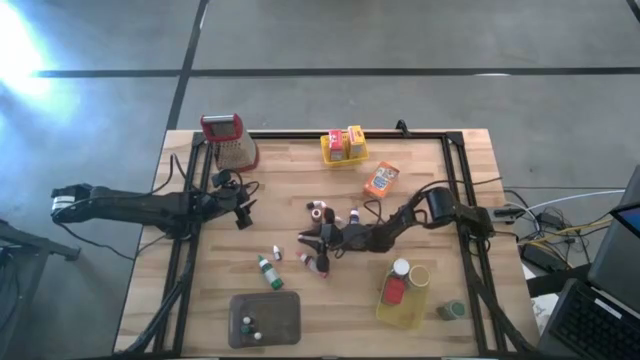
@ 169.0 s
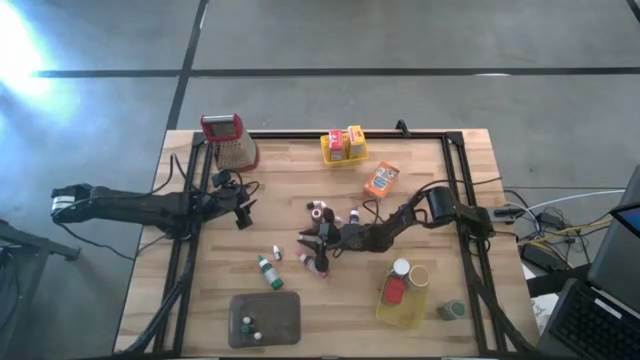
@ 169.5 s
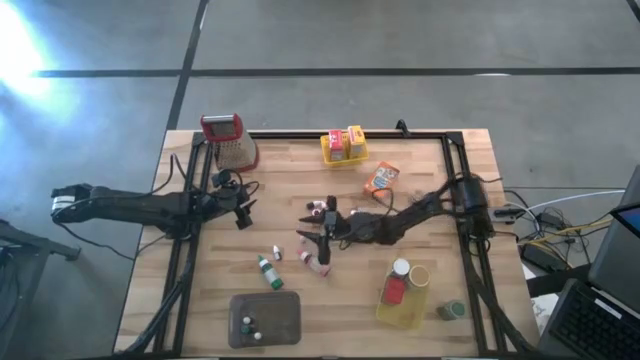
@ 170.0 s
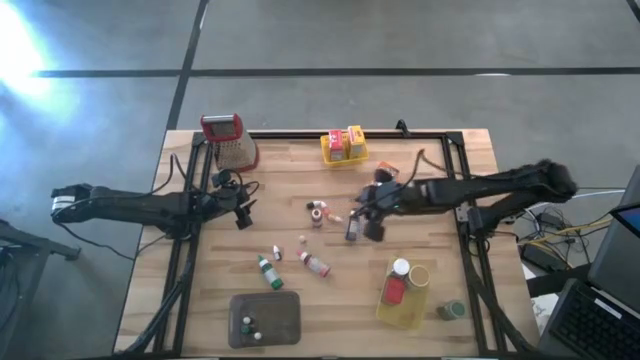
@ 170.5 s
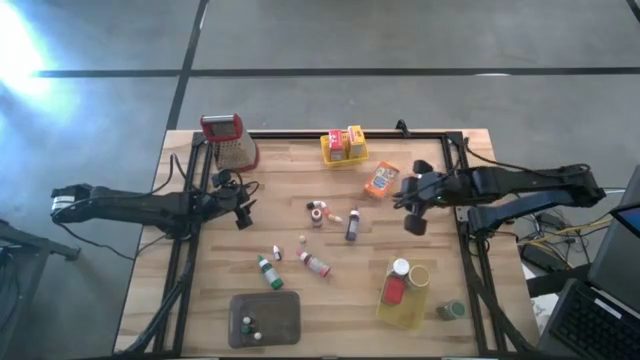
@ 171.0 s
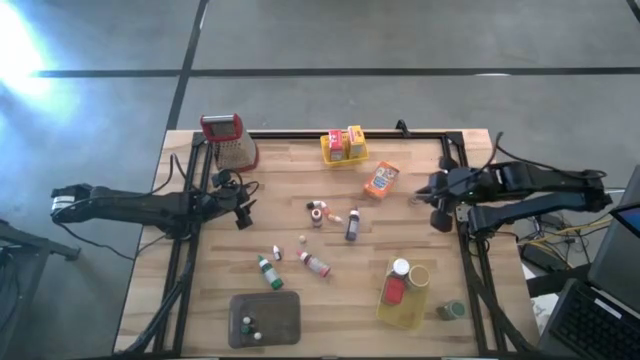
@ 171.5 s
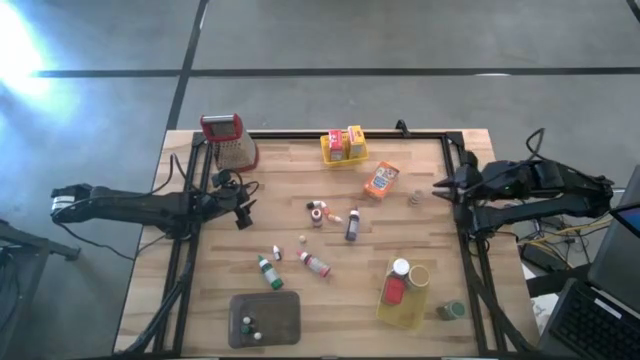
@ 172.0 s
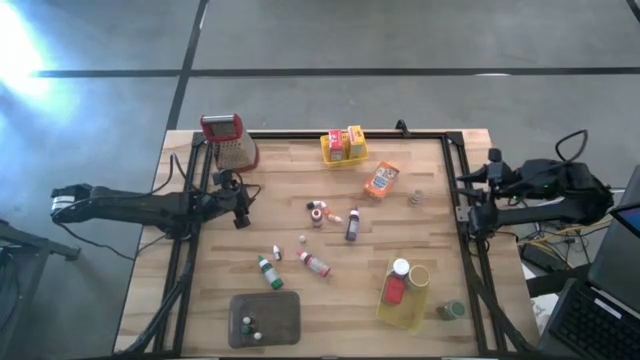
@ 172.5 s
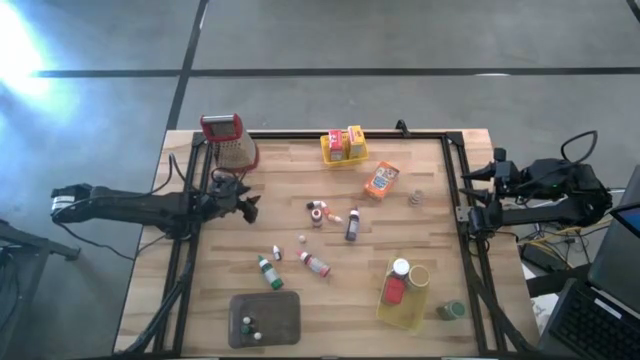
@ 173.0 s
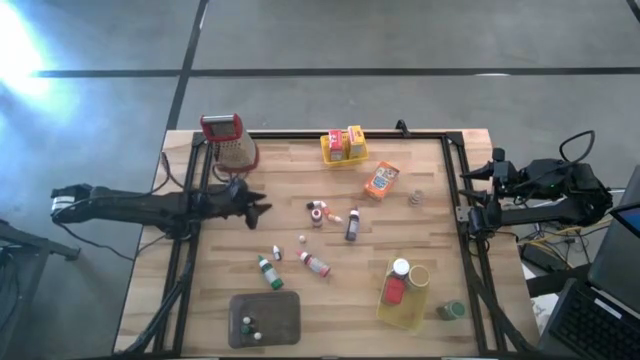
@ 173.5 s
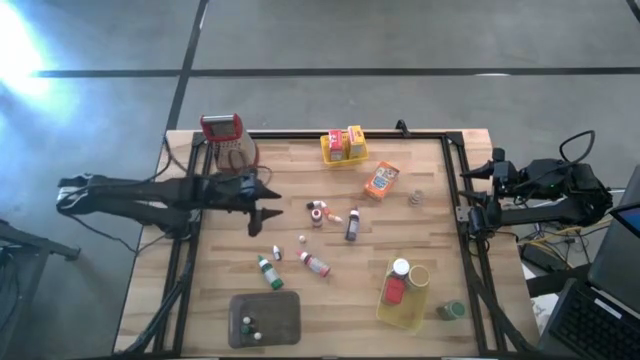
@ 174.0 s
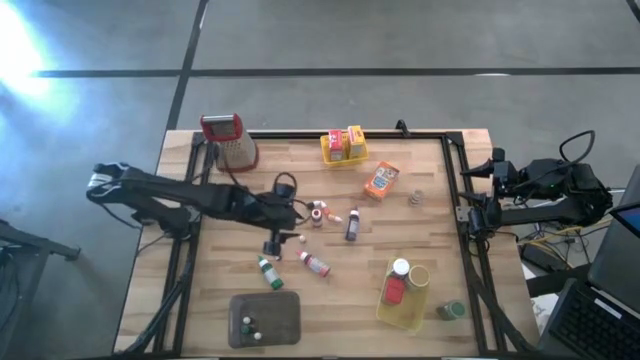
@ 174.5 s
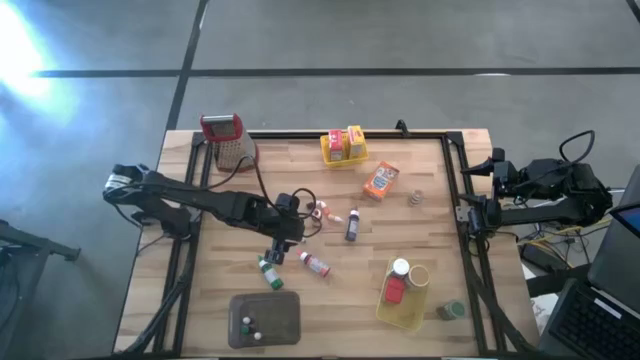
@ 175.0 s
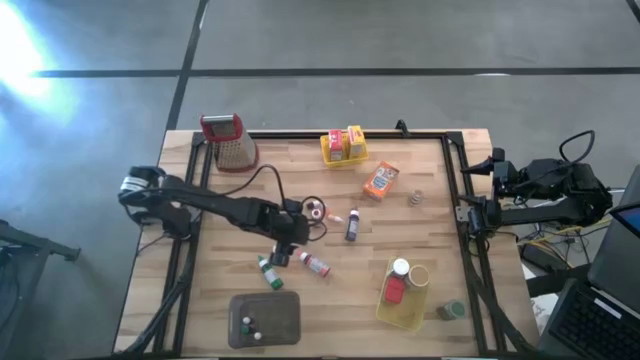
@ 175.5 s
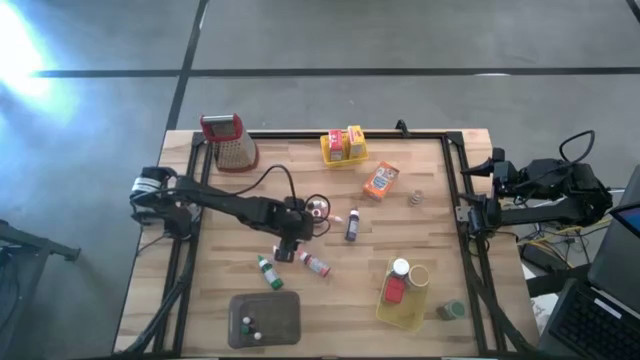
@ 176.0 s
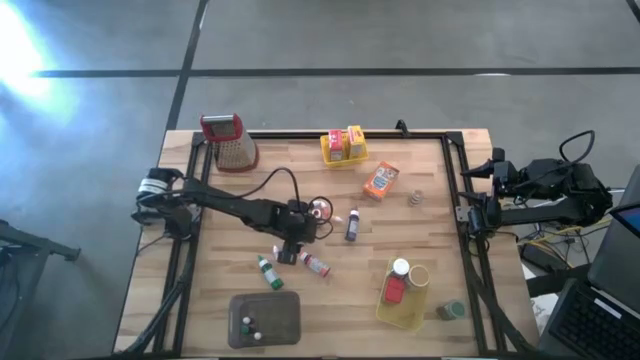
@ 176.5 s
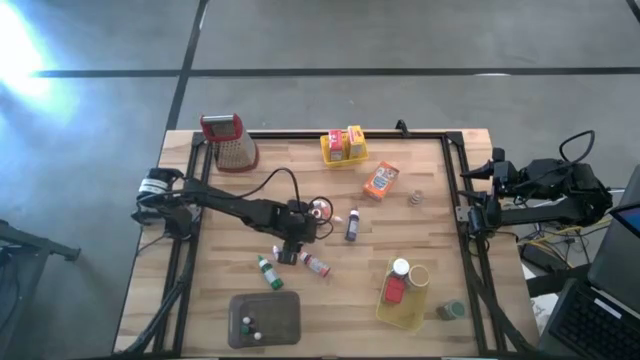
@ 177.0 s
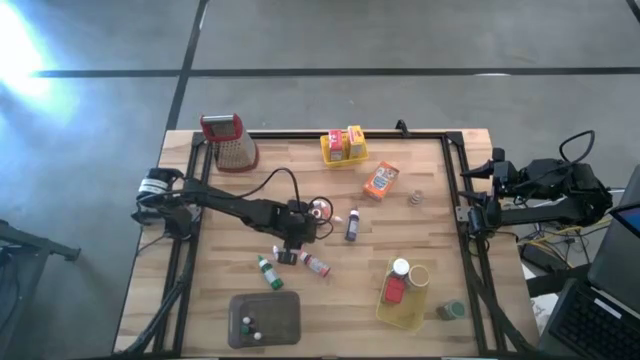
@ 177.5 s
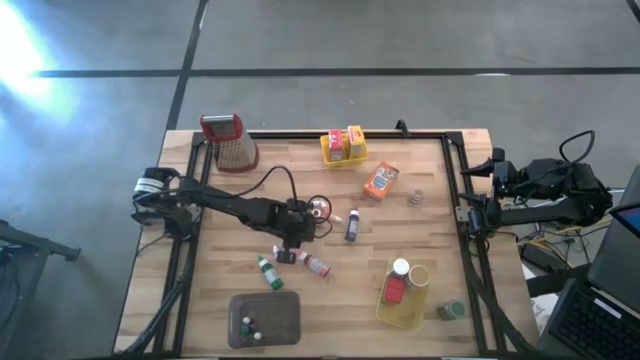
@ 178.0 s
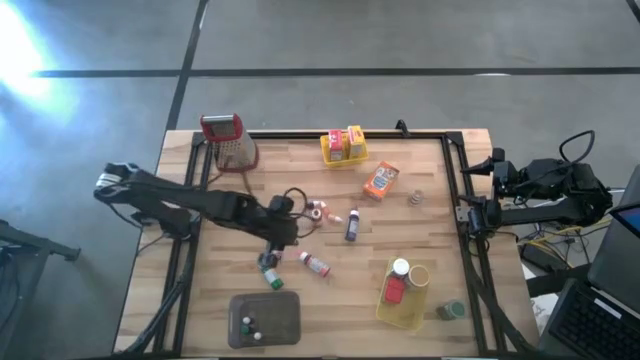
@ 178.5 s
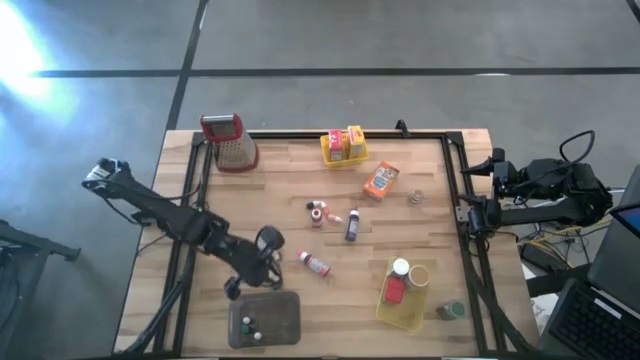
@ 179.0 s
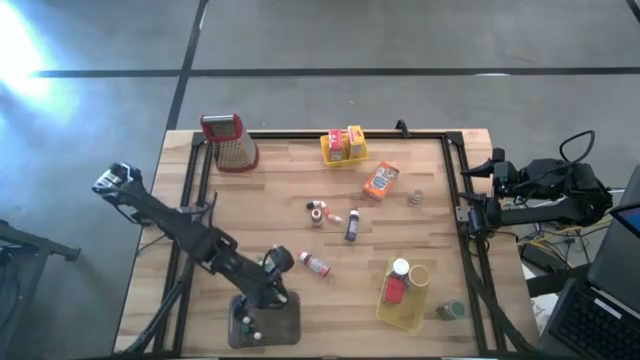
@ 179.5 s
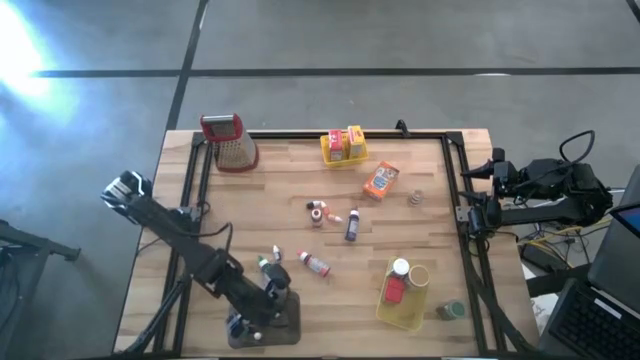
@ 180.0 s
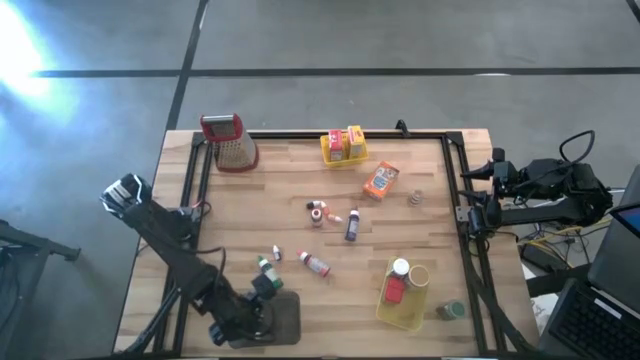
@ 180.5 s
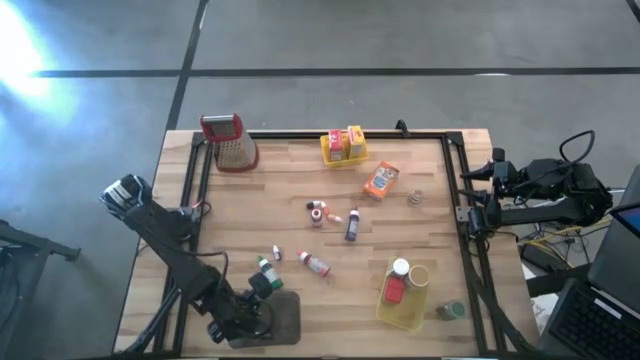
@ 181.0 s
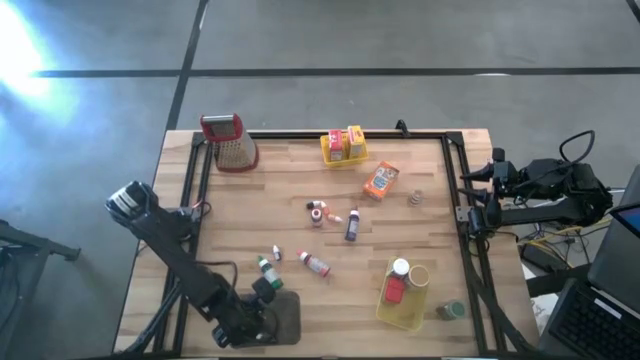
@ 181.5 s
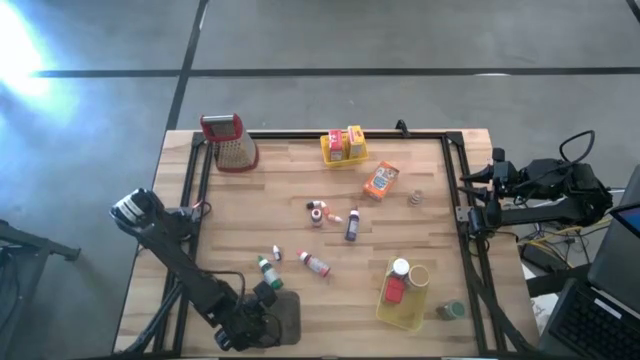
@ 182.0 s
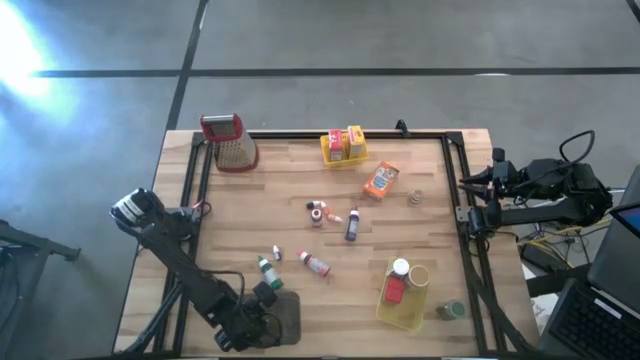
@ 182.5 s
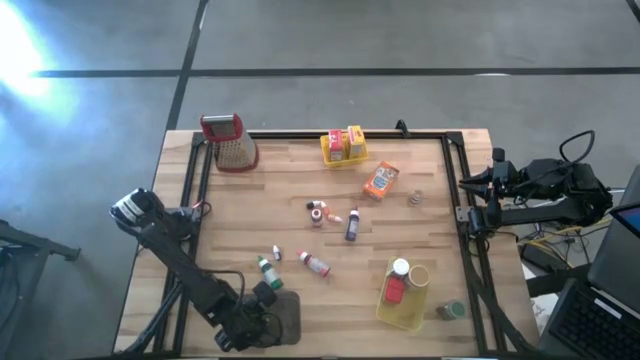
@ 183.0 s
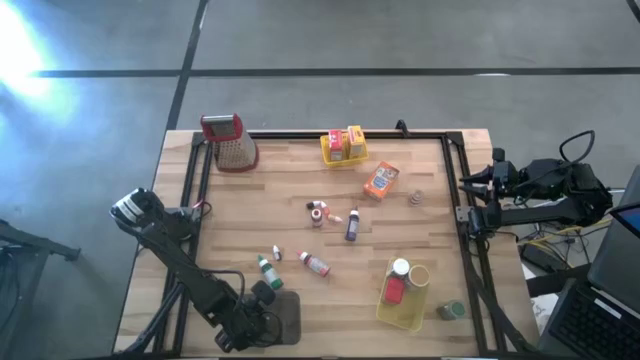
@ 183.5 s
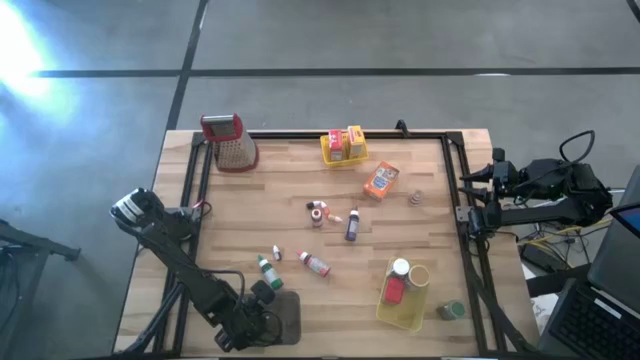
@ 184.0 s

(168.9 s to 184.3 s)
Task: Pick & Place Kitchen Items
Put the right small pink food coloring bottle into the black bin

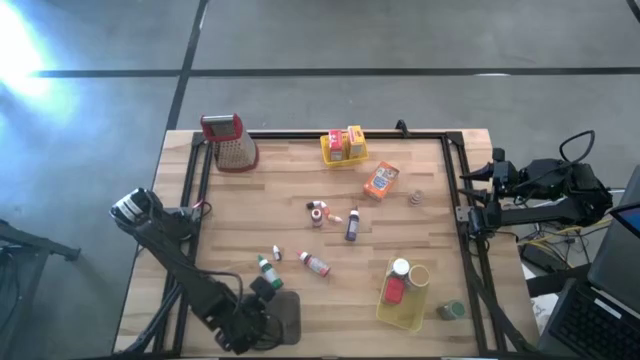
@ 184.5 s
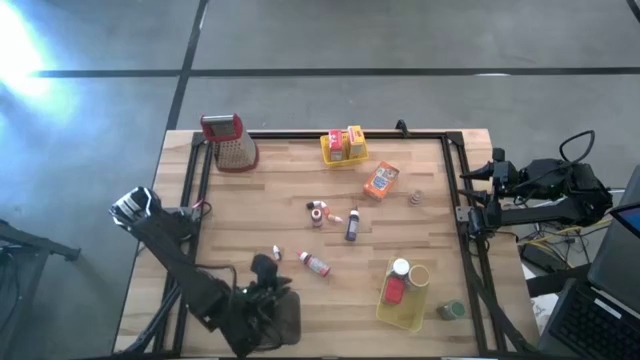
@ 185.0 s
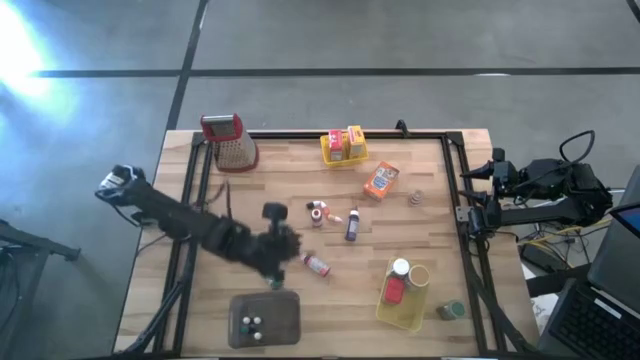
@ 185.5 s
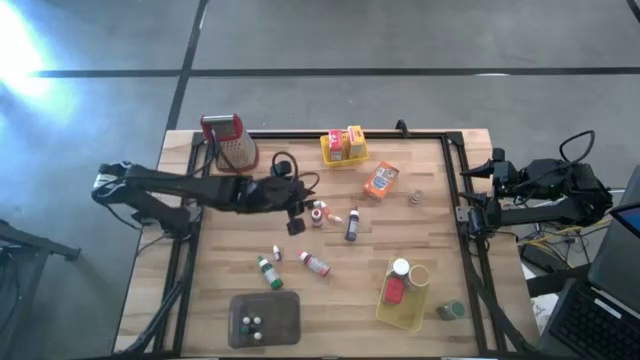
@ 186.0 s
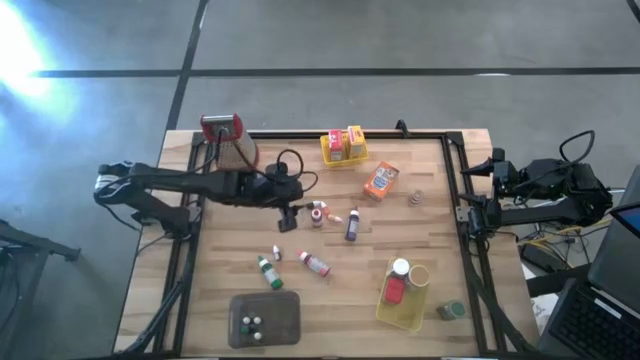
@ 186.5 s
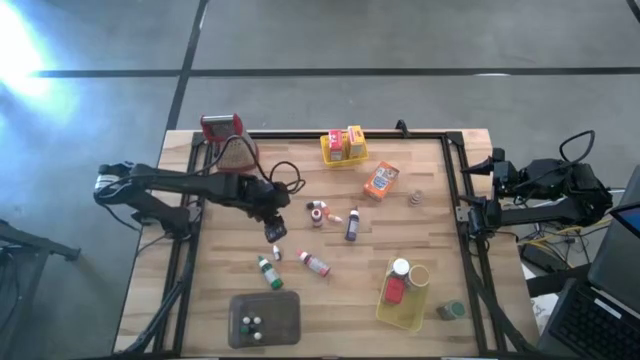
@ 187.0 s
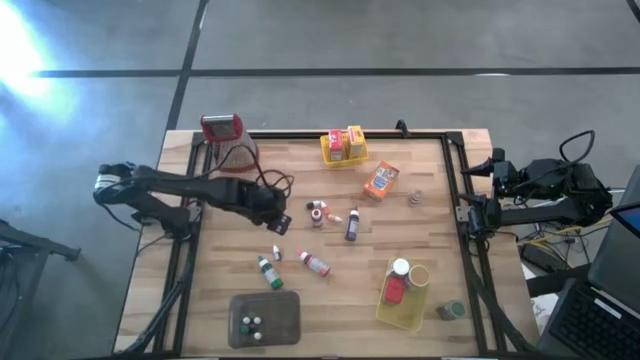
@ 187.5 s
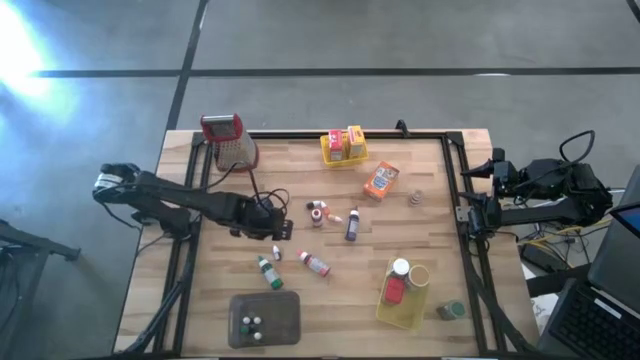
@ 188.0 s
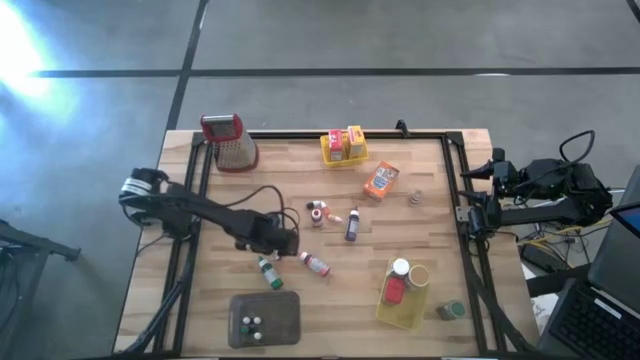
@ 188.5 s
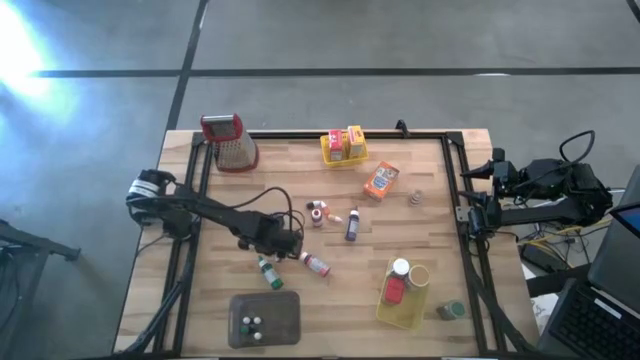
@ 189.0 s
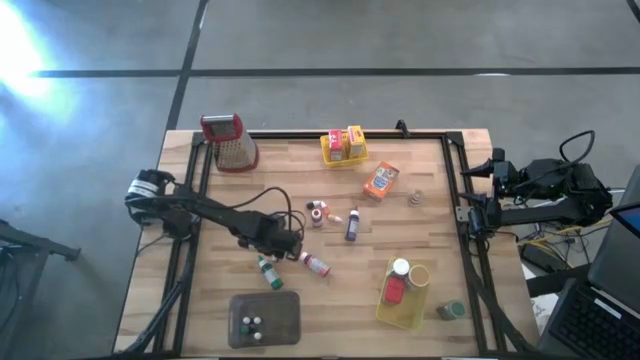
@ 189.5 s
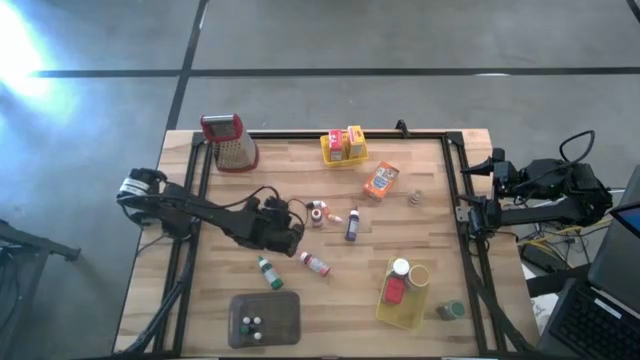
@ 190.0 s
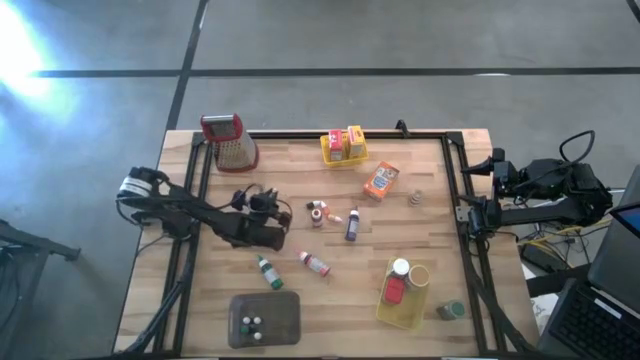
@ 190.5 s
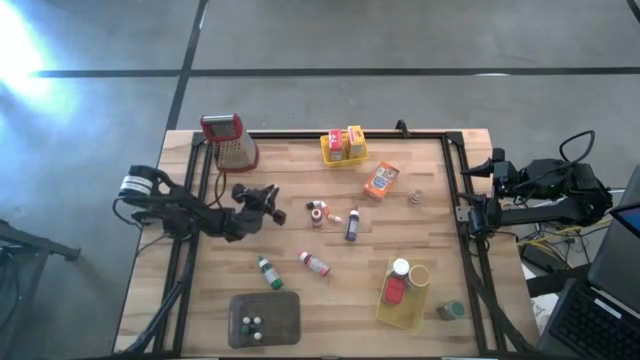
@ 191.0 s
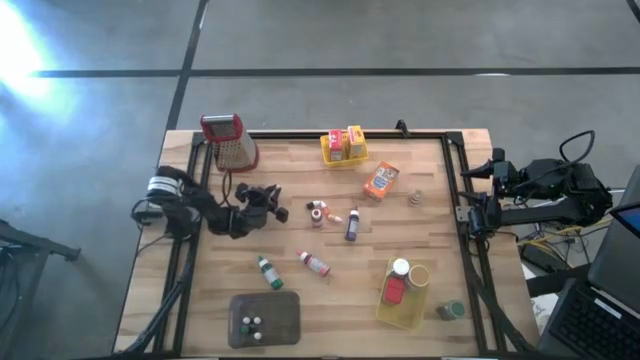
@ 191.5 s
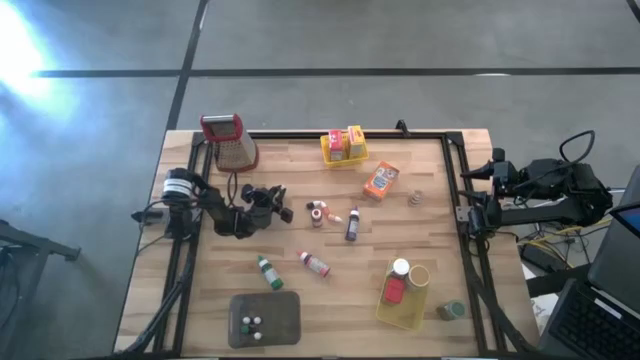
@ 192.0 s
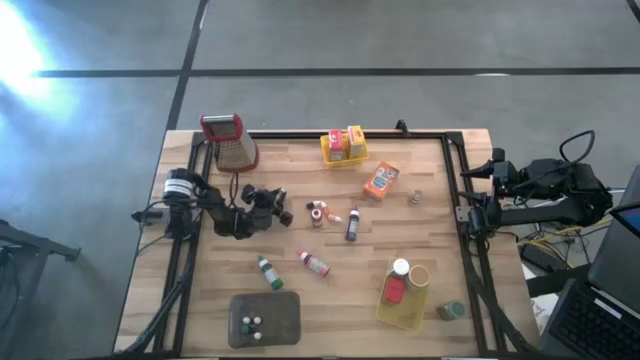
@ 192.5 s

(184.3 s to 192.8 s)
Adjust the small pink food coloring on the table
